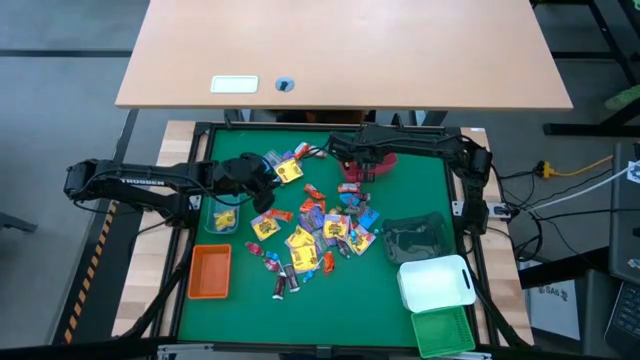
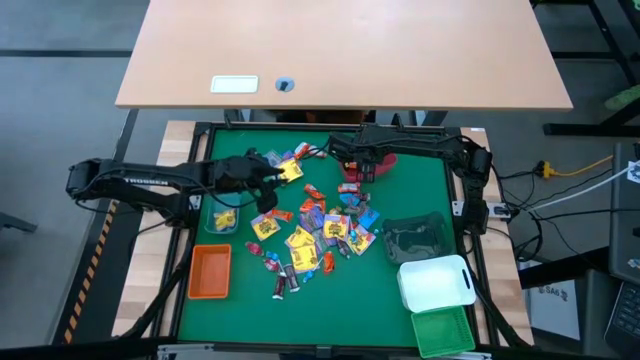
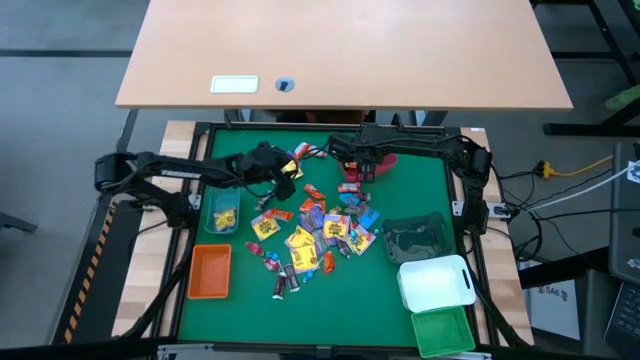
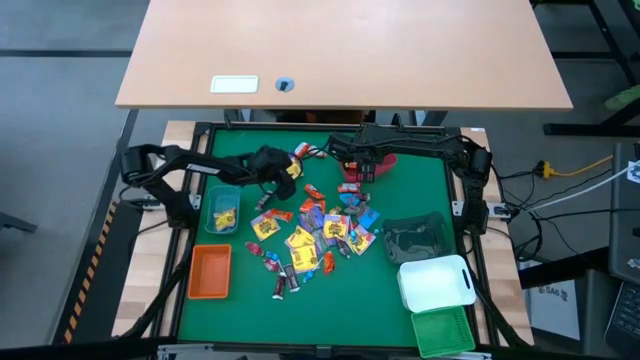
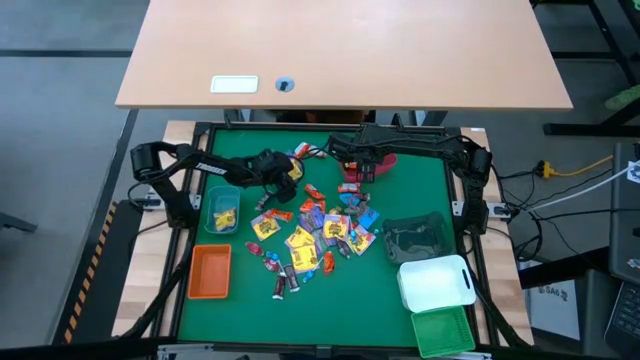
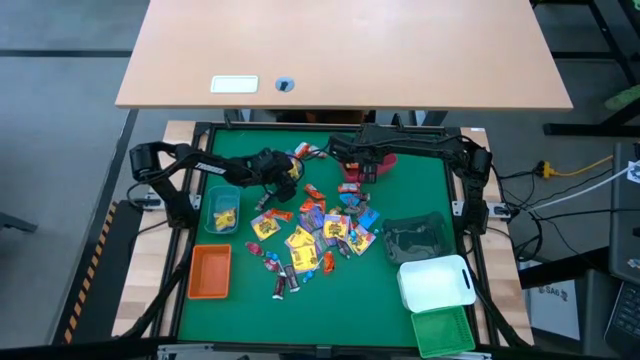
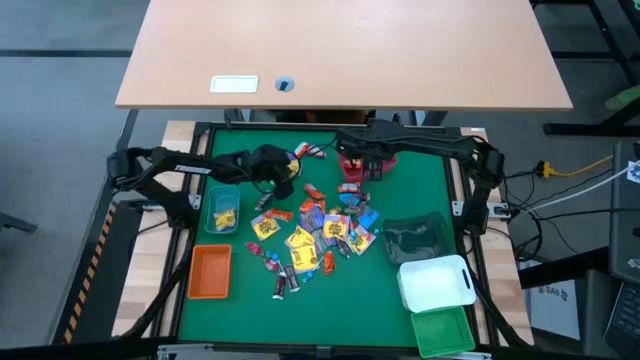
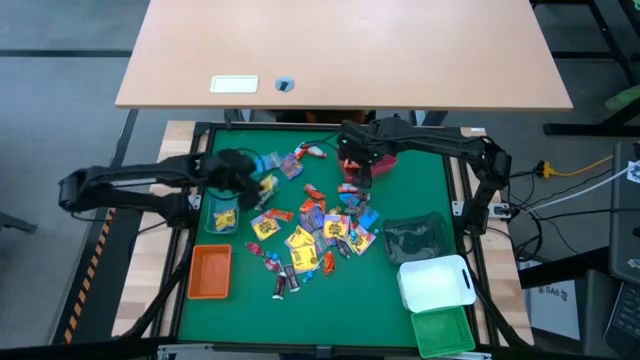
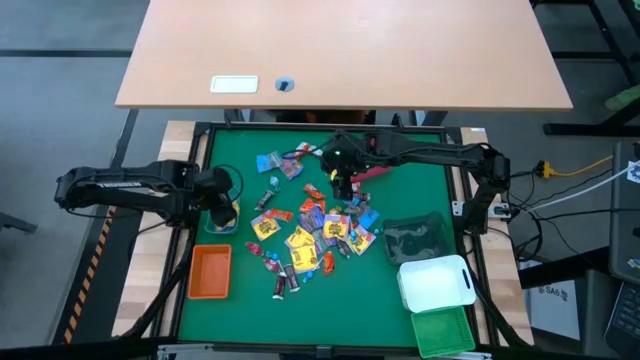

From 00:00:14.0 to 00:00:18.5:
Task: Sort candy
Put the yellow candy into the blue bin

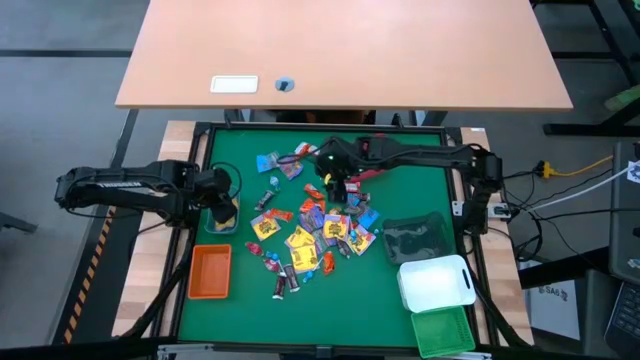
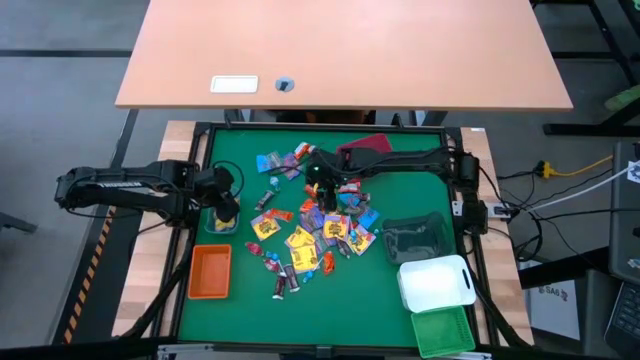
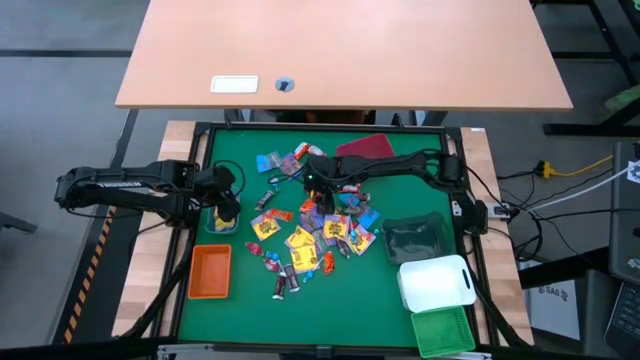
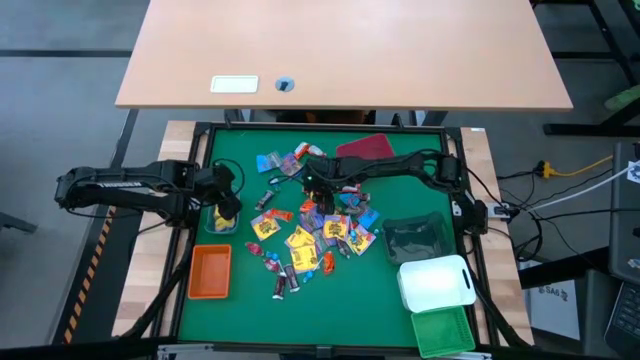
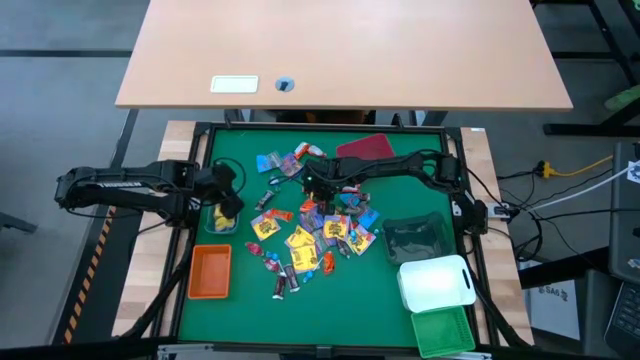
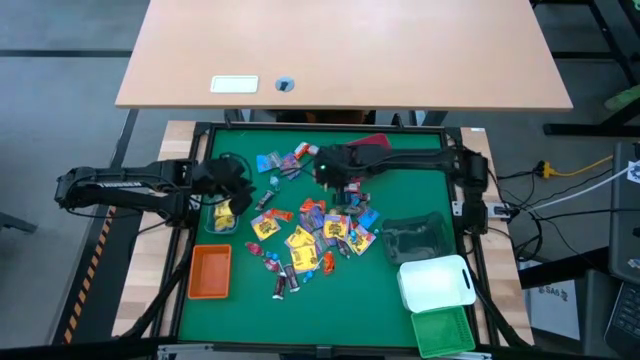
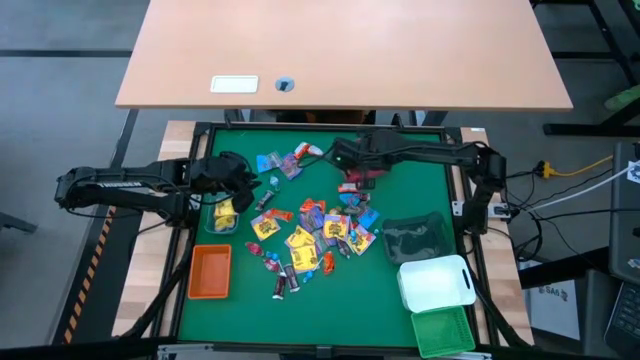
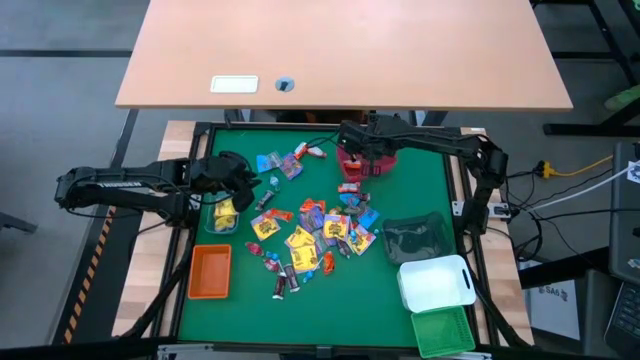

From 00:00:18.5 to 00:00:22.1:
Put the orange chocolate bar into the red bin

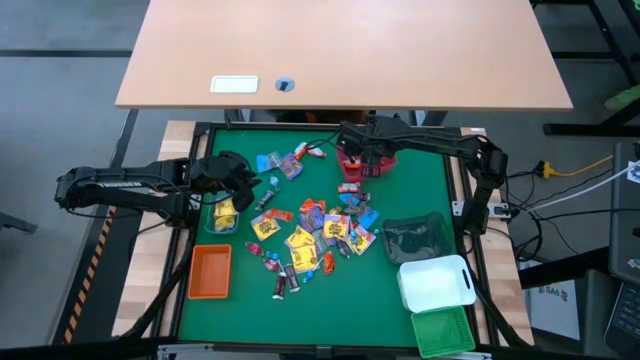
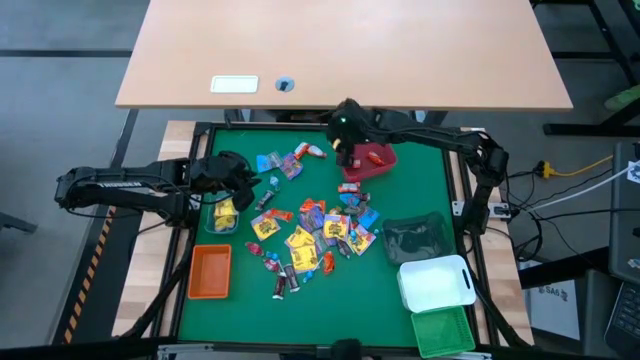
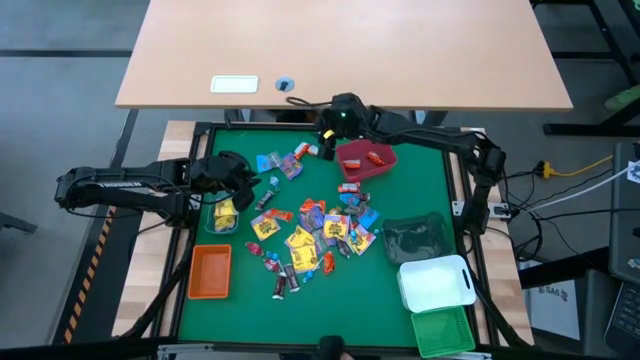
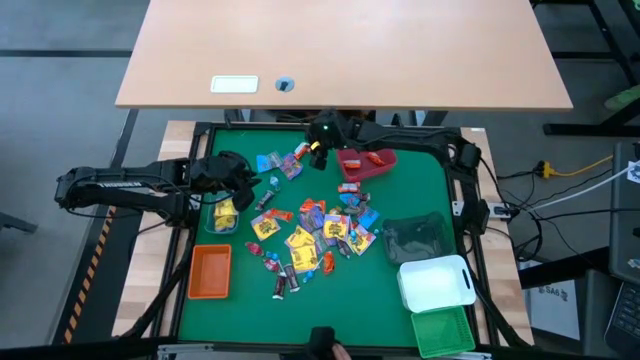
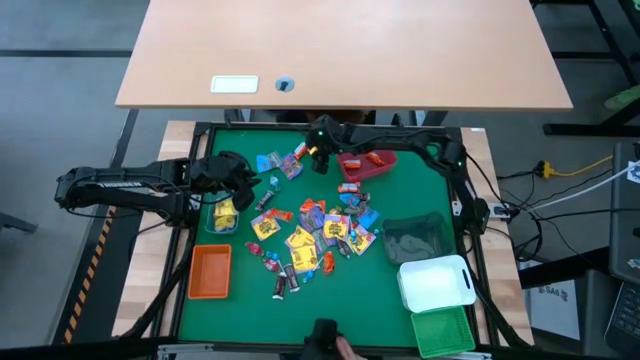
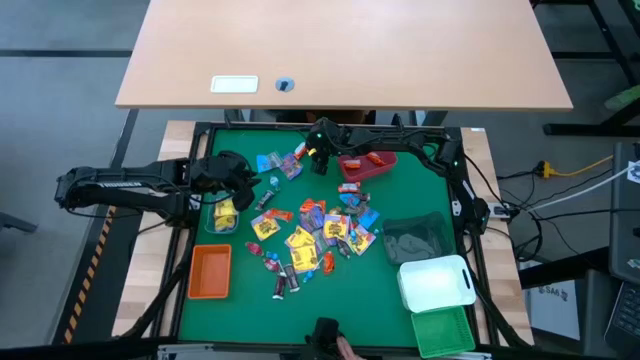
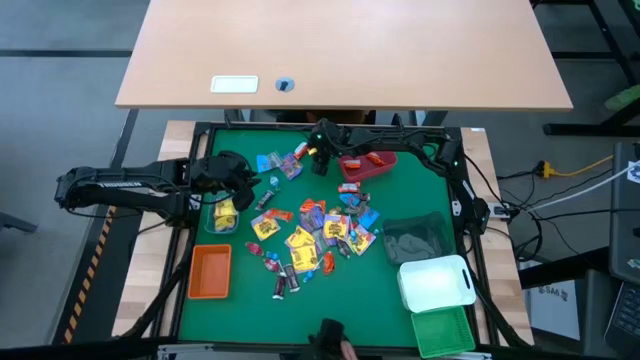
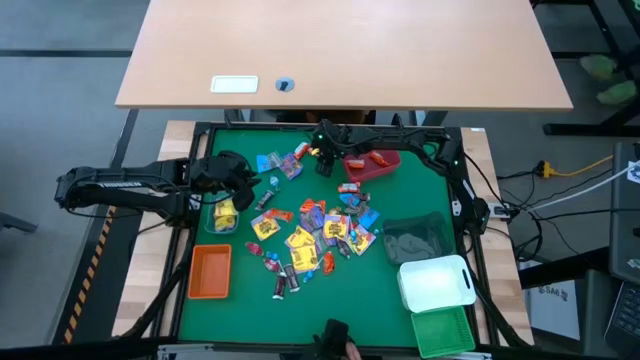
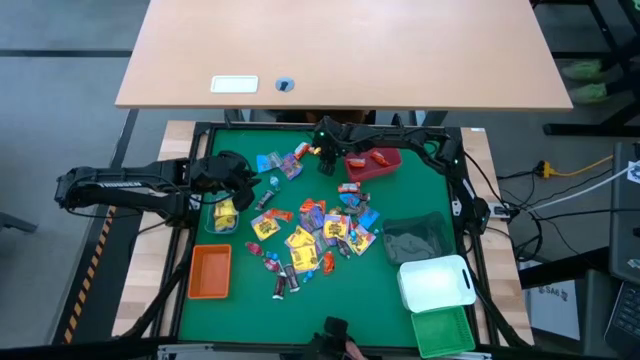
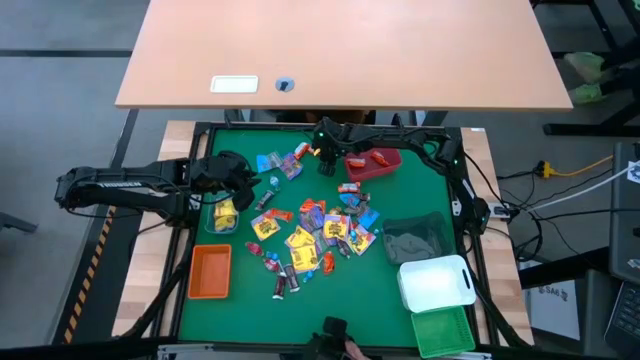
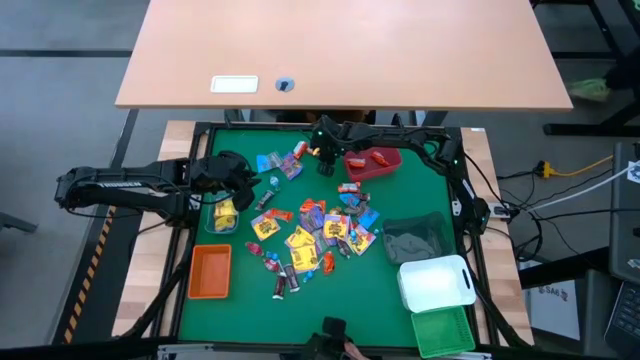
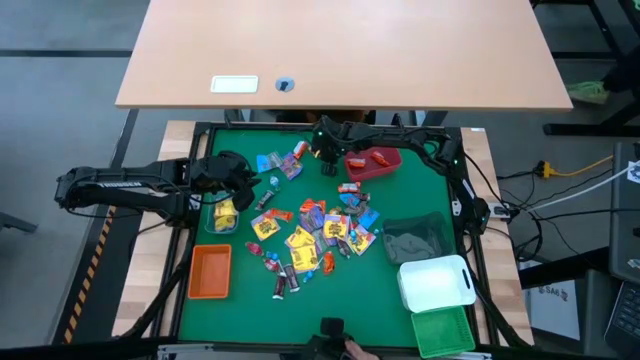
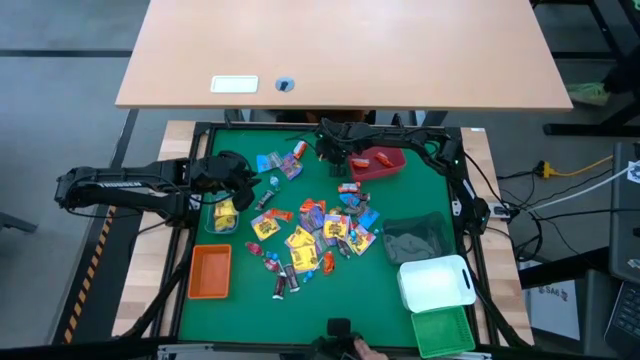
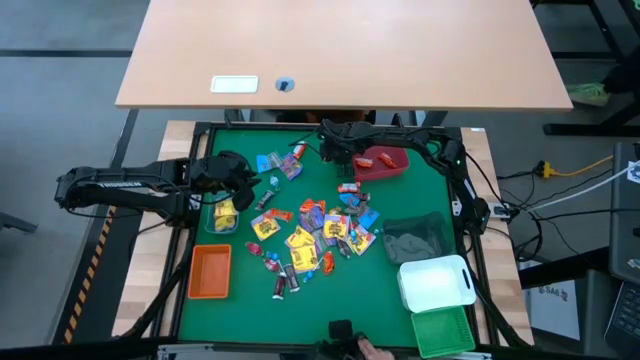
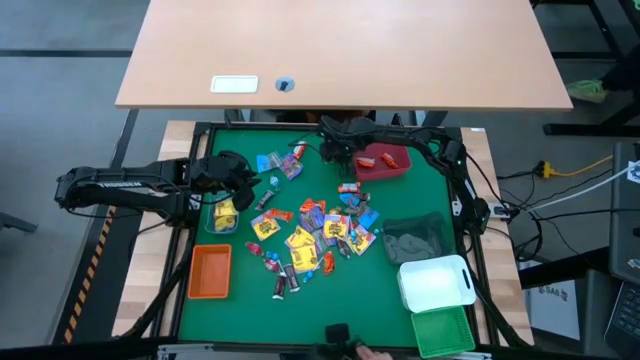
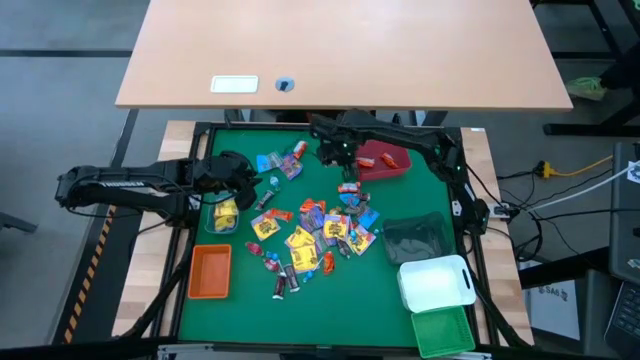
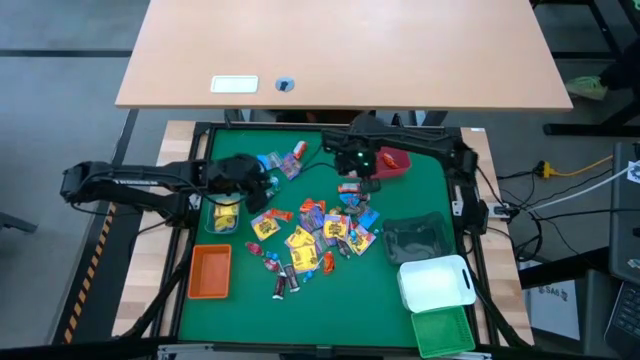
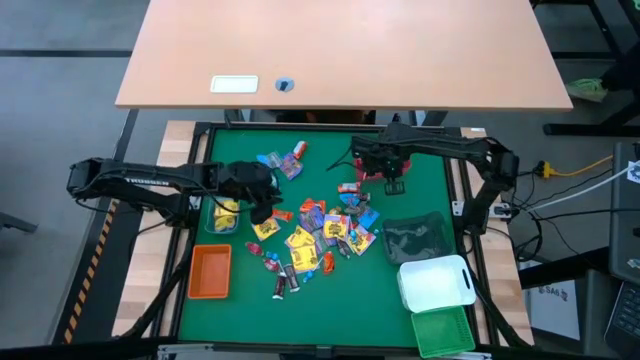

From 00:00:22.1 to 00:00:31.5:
Put the orange chocolate bar into the red bin

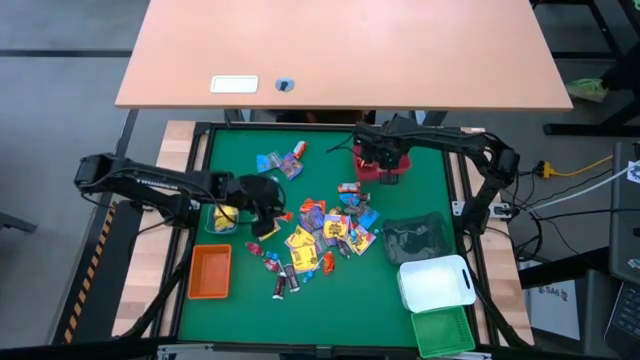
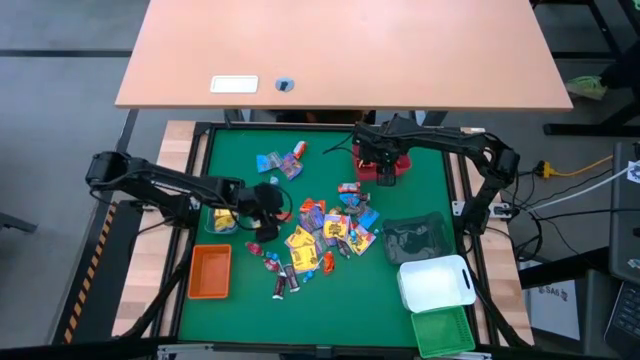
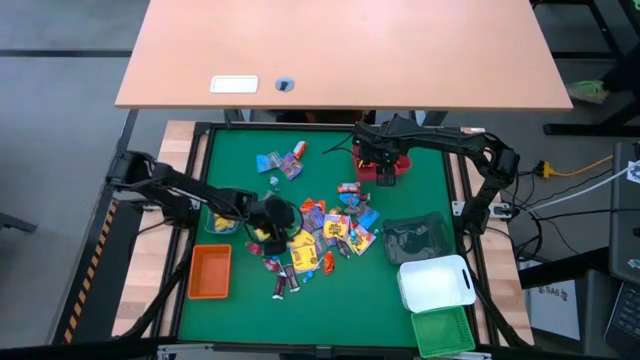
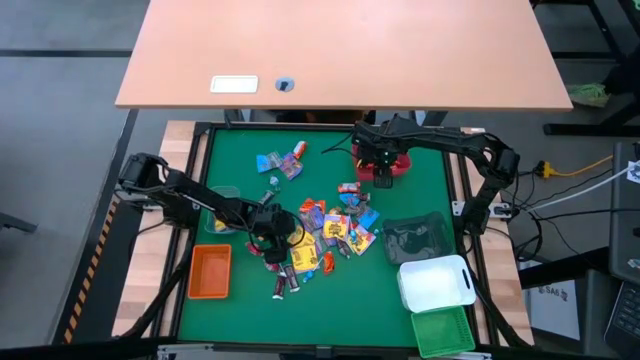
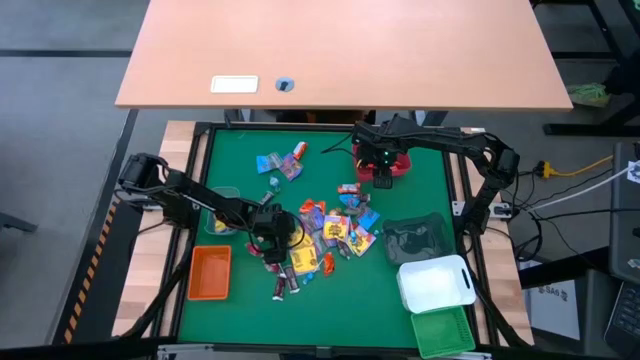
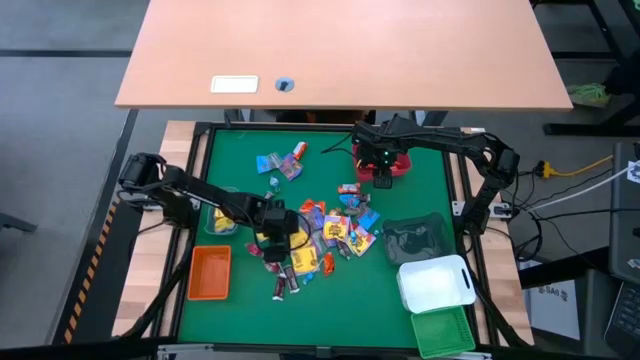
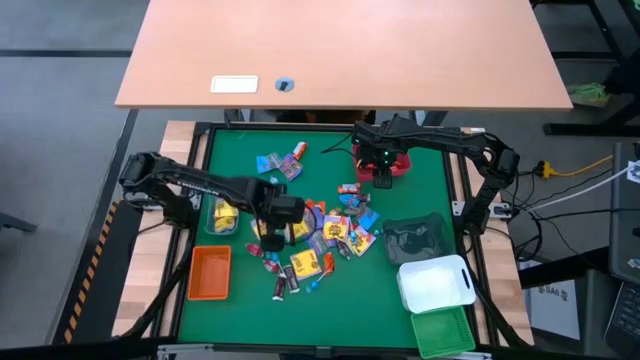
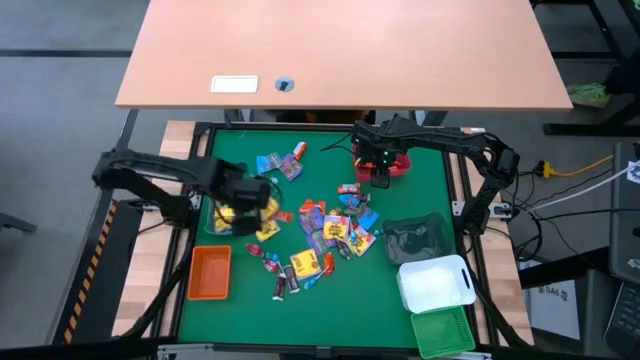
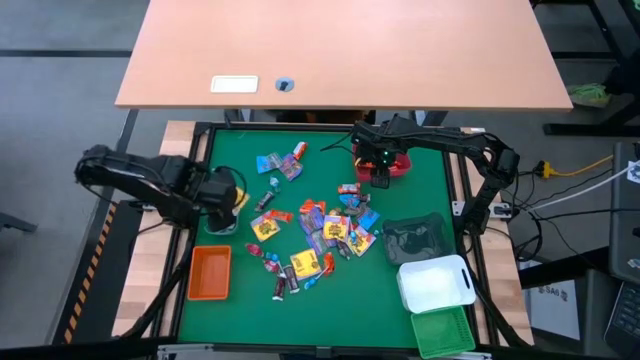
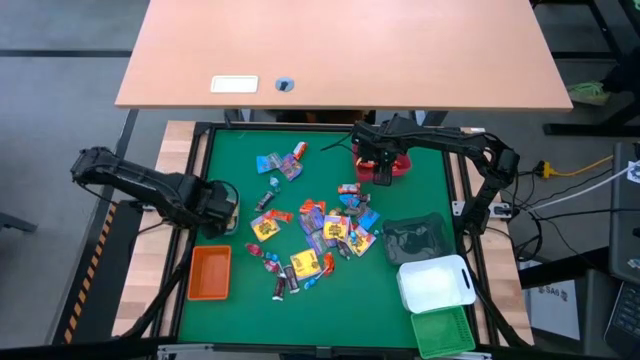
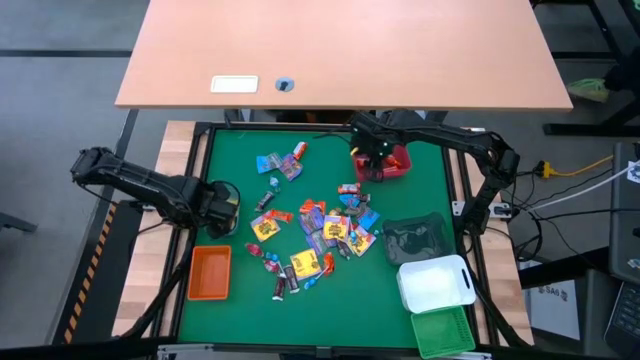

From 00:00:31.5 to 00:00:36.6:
Put the yellow candy into the blue bin
